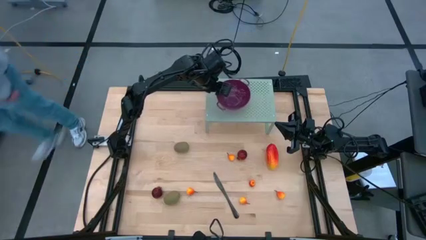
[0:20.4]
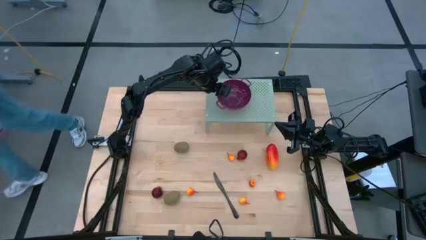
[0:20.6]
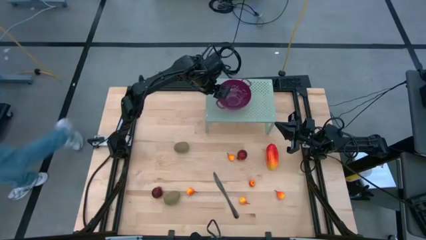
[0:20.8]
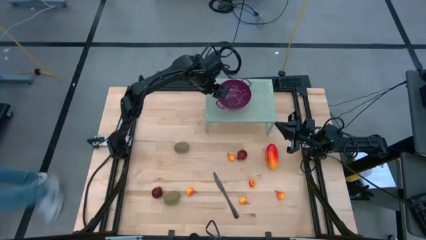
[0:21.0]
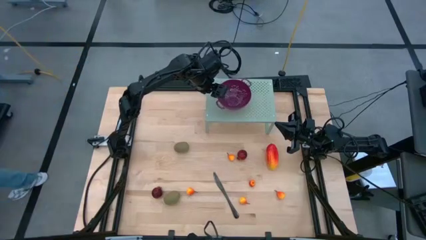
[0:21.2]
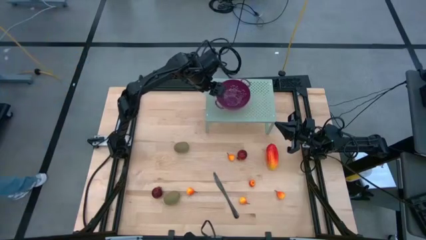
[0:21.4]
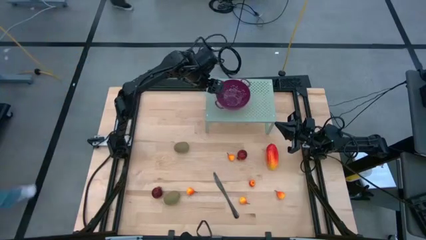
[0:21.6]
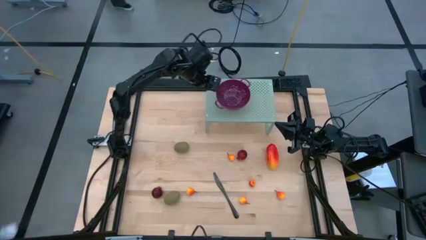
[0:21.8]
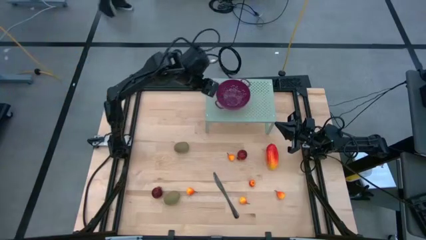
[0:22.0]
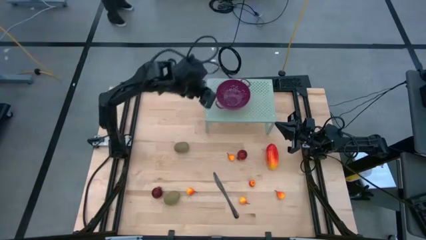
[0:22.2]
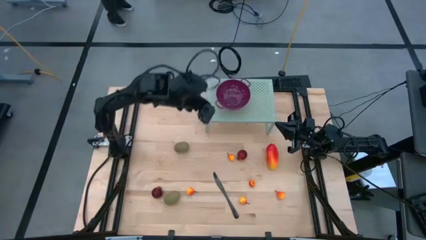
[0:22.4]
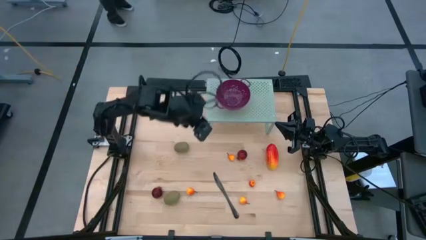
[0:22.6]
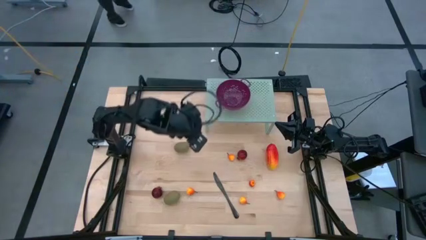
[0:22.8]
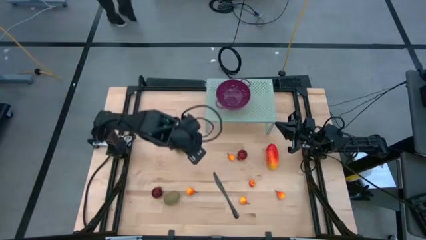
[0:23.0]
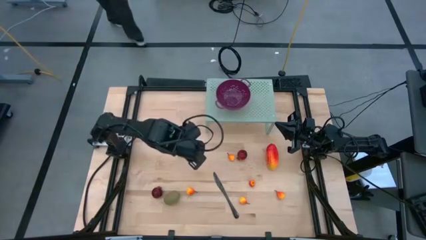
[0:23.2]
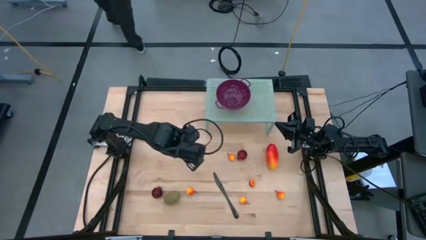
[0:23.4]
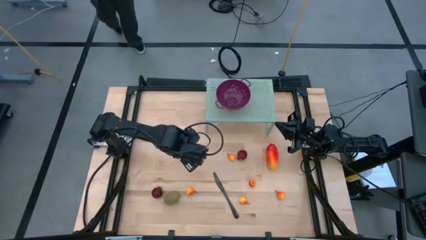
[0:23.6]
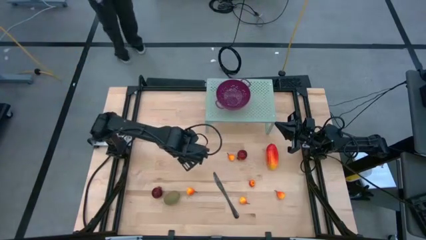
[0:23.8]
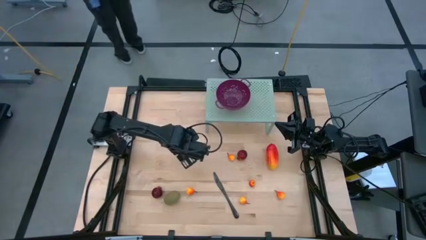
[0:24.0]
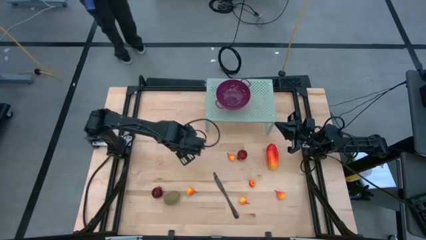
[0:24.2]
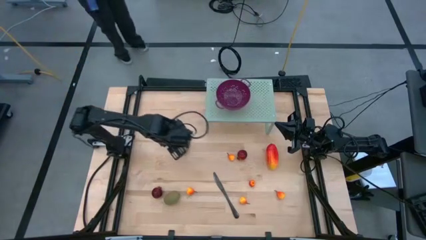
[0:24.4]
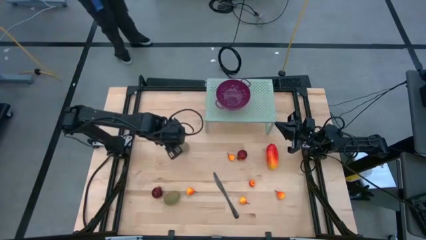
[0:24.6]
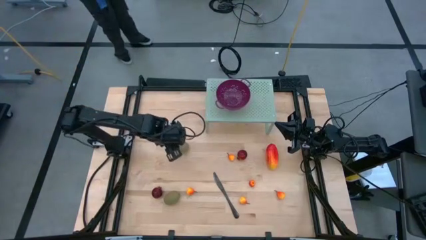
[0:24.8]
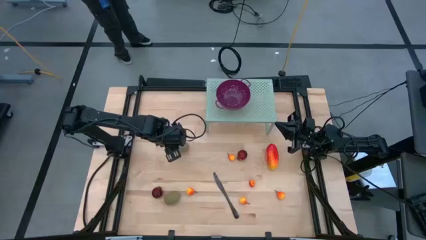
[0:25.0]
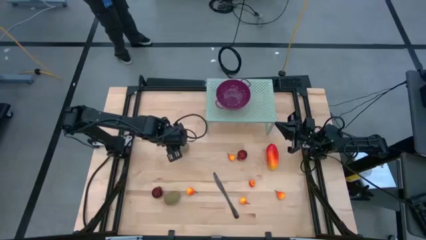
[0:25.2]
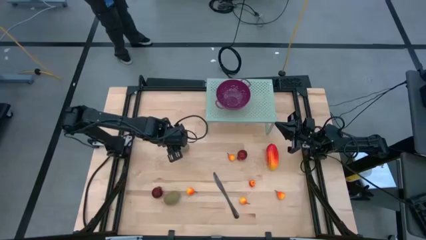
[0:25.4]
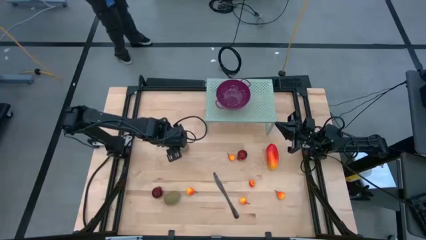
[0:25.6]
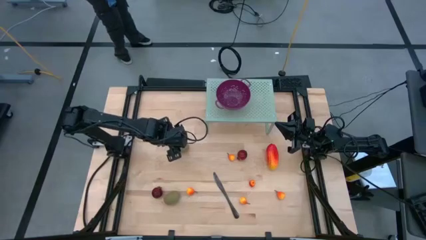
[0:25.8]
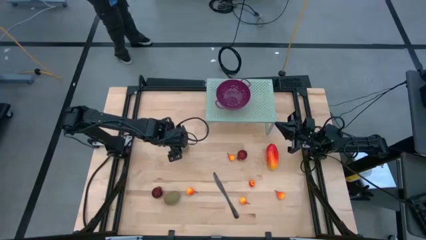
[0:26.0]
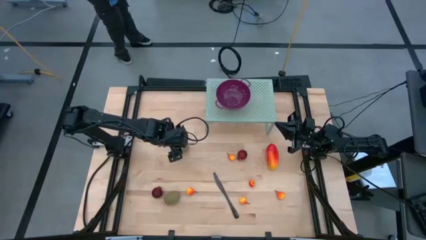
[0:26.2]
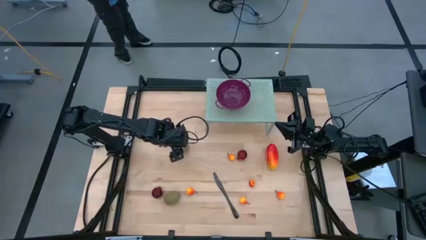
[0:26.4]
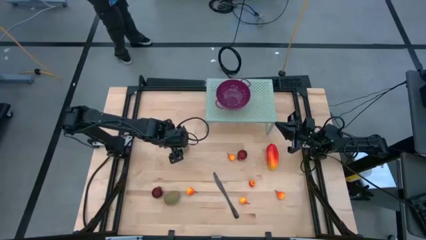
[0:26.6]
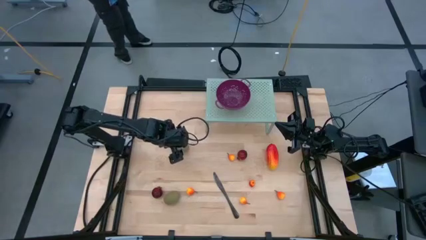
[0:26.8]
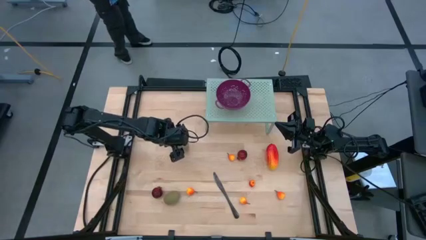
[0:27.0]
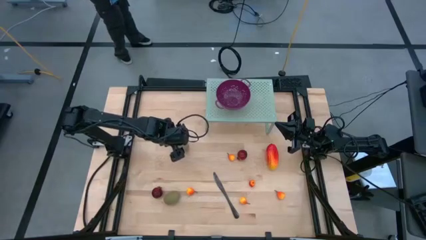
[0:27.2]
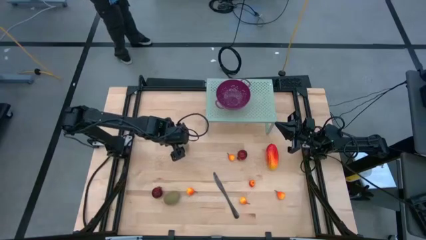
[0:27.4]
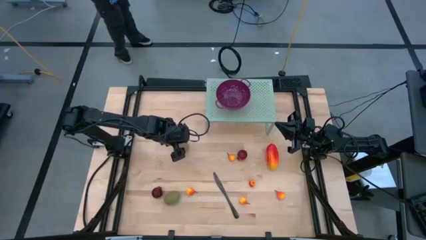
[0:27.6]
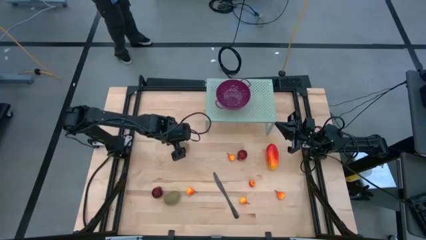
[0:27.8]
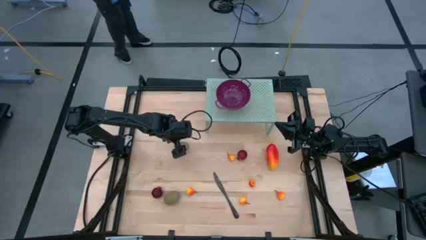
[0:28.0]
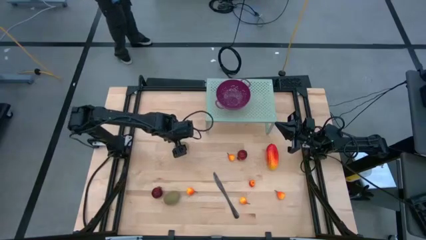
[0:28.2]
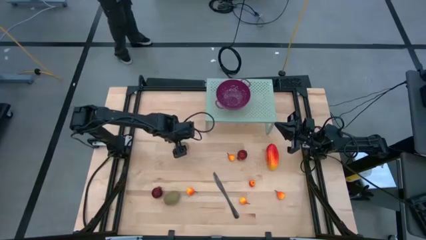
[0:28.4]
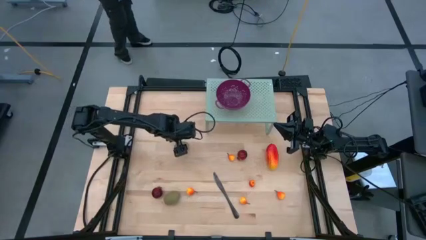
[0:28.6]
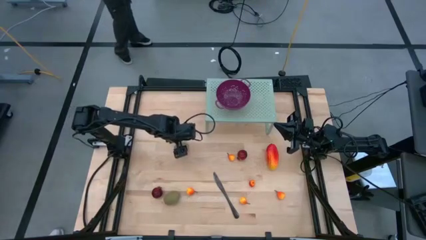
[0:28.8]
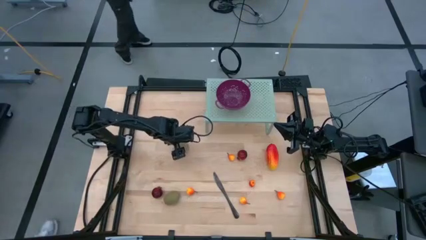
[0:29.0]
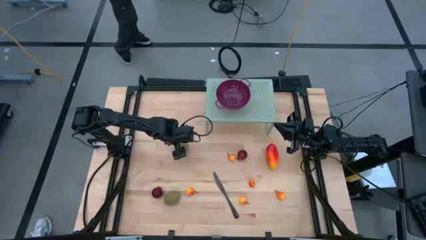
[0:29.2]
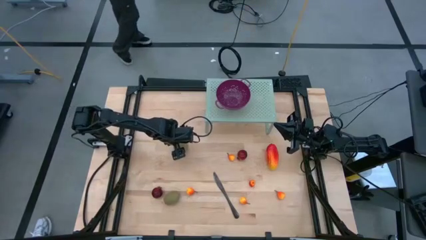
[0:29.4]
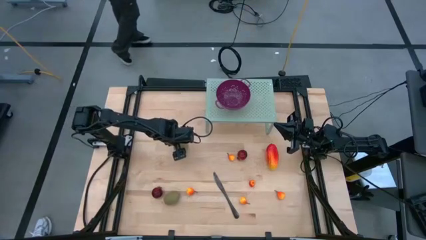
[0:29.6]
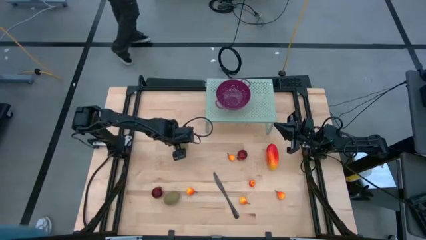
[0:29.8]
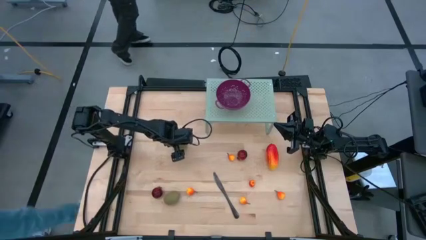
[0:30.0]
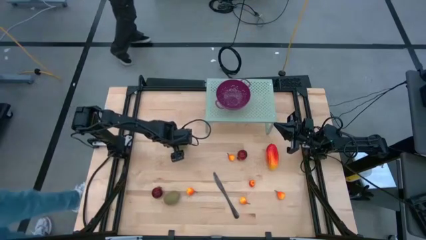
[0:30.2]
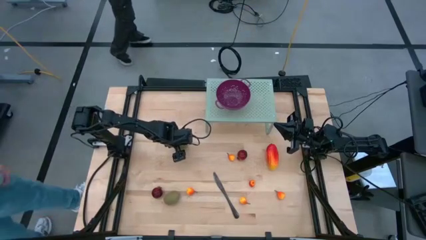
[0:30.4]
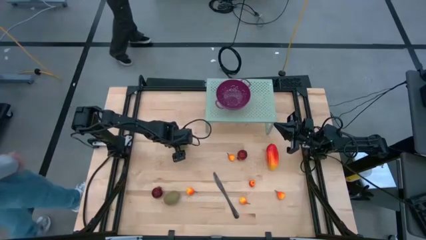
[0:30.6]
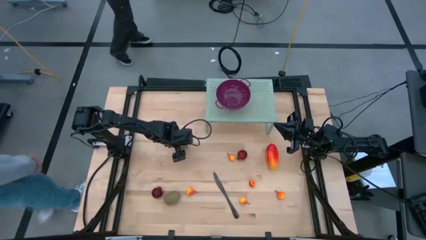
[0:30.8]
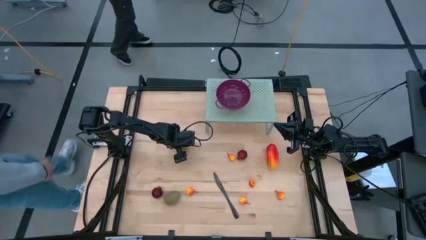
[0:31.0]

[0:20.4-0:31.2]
Task: Pick & Place Fruit
Put the brown kiwi into the violet strainer bowl on the shelf
